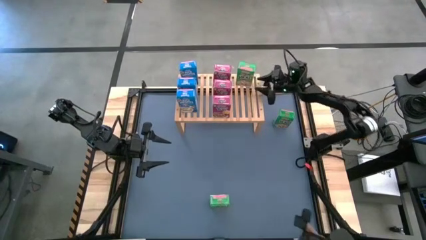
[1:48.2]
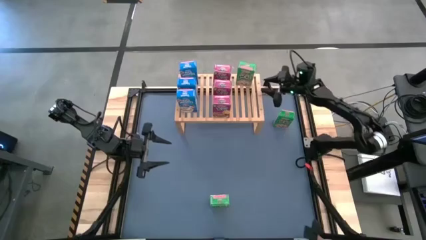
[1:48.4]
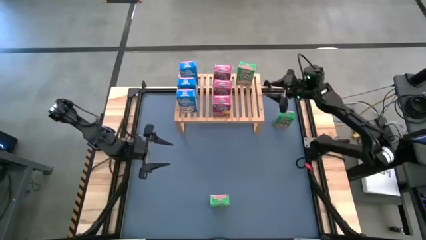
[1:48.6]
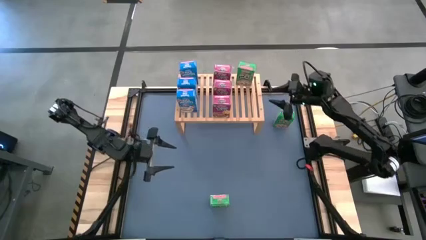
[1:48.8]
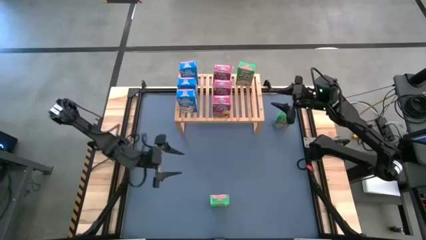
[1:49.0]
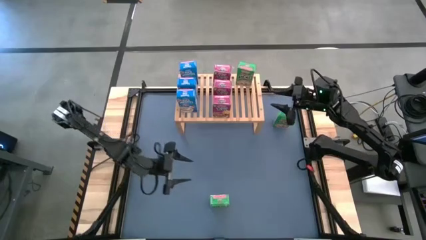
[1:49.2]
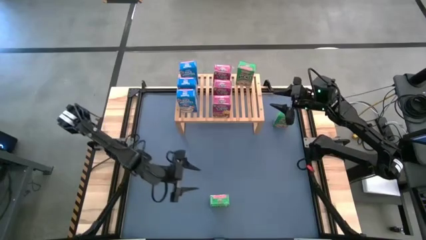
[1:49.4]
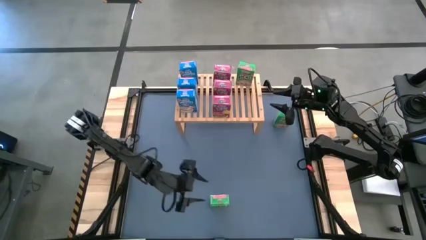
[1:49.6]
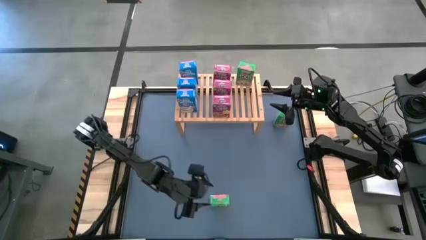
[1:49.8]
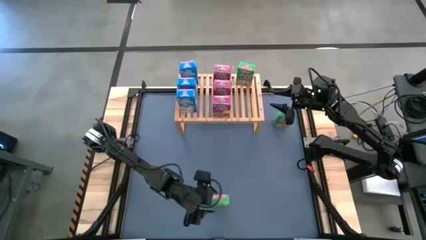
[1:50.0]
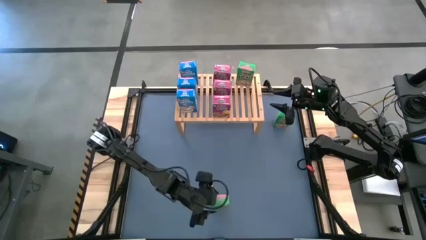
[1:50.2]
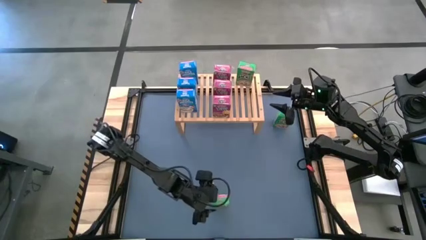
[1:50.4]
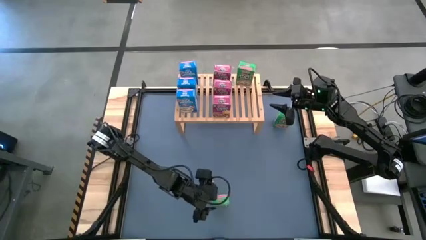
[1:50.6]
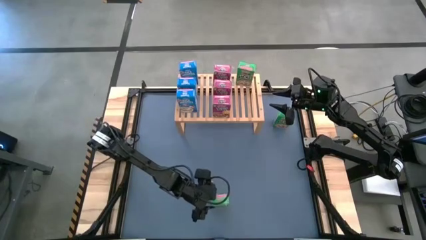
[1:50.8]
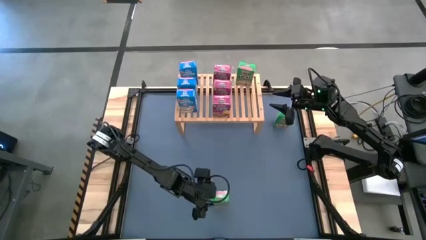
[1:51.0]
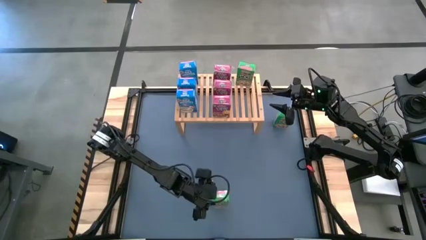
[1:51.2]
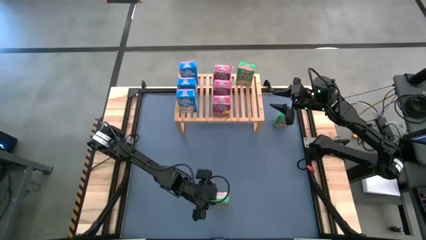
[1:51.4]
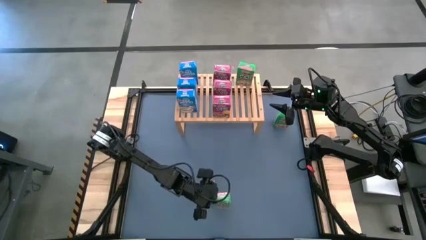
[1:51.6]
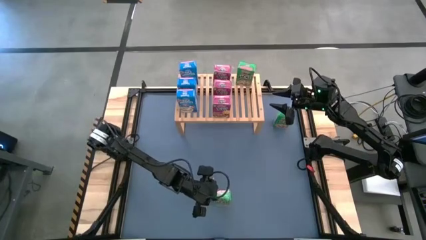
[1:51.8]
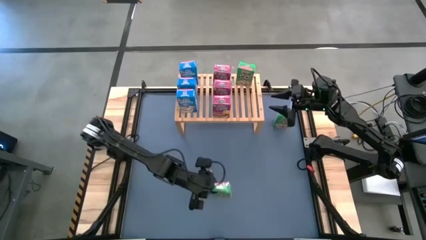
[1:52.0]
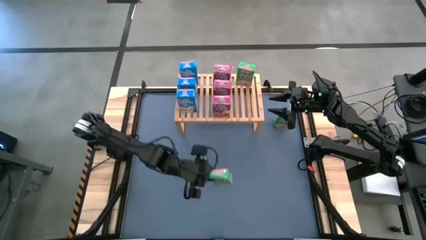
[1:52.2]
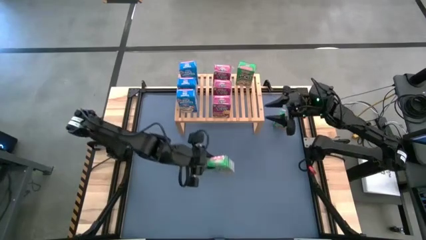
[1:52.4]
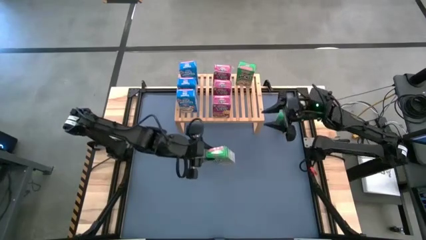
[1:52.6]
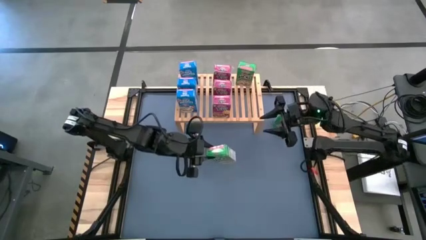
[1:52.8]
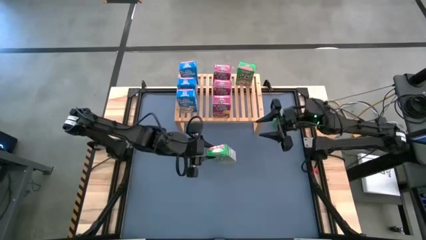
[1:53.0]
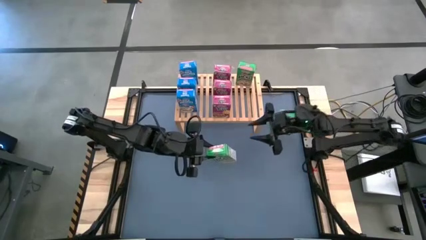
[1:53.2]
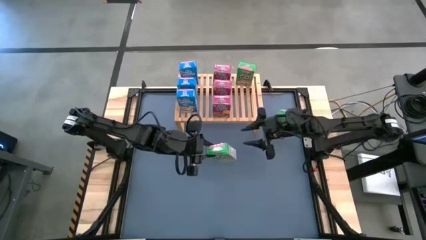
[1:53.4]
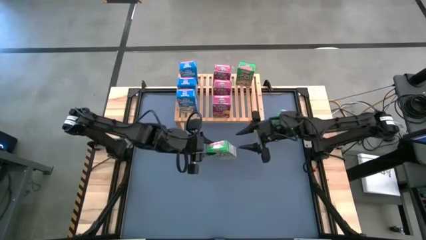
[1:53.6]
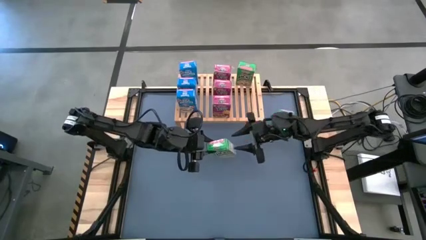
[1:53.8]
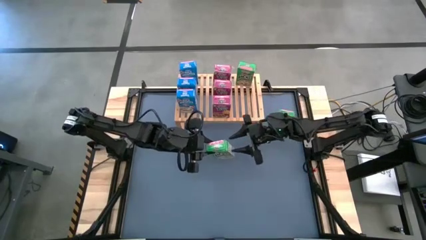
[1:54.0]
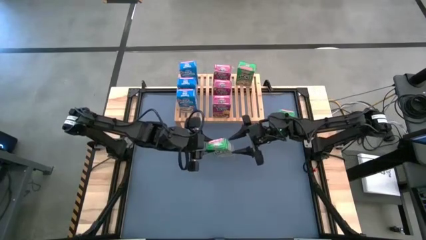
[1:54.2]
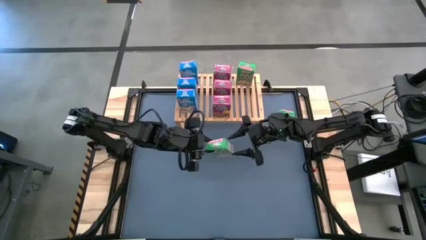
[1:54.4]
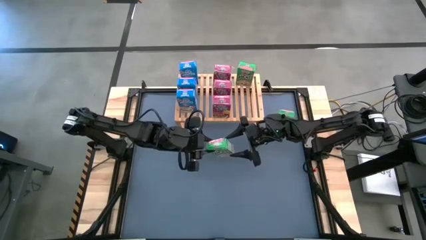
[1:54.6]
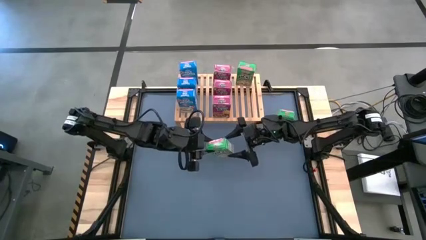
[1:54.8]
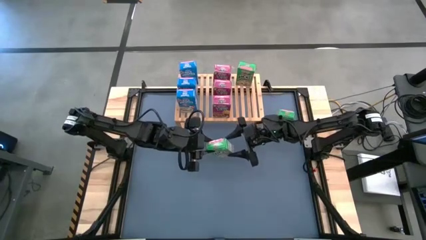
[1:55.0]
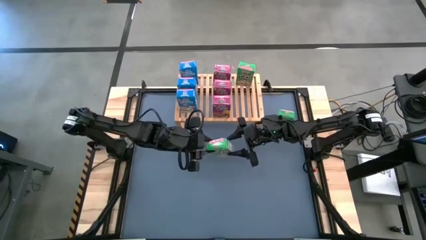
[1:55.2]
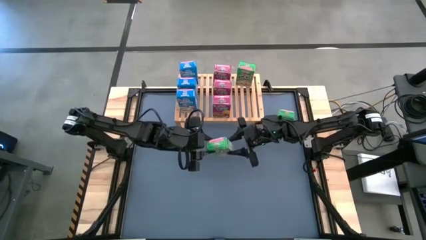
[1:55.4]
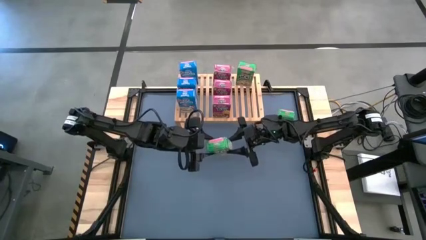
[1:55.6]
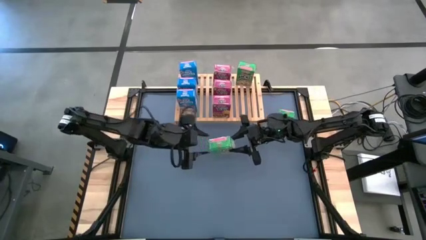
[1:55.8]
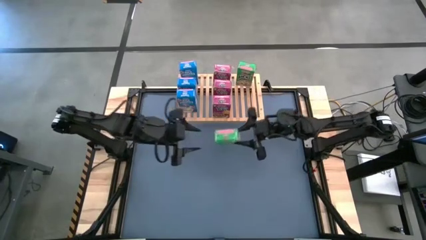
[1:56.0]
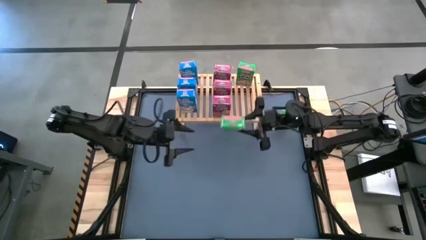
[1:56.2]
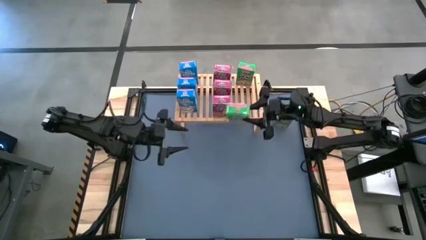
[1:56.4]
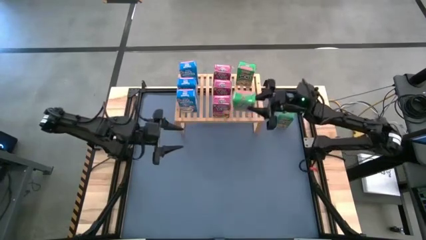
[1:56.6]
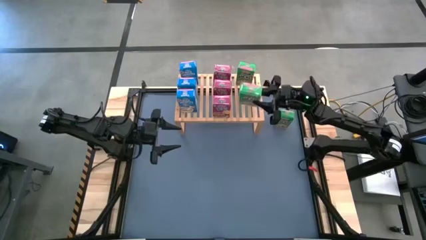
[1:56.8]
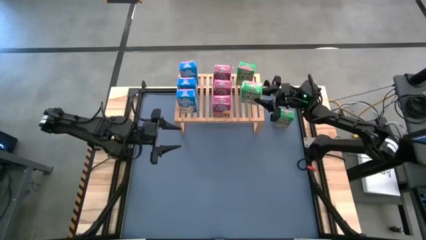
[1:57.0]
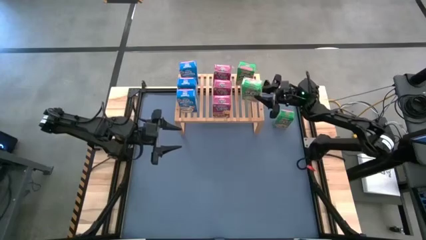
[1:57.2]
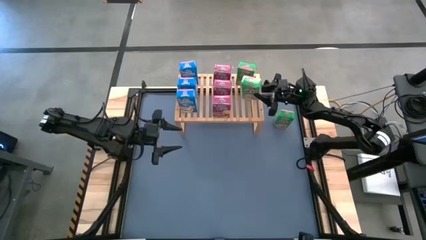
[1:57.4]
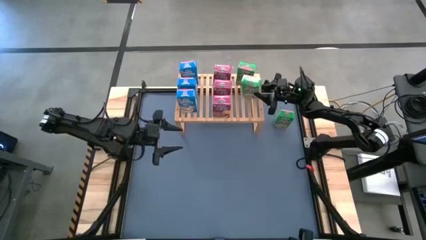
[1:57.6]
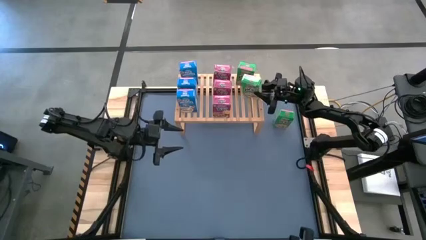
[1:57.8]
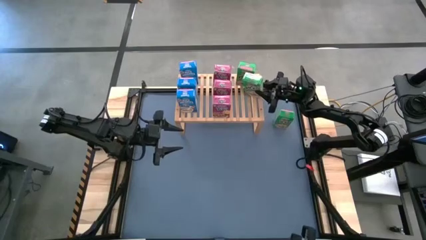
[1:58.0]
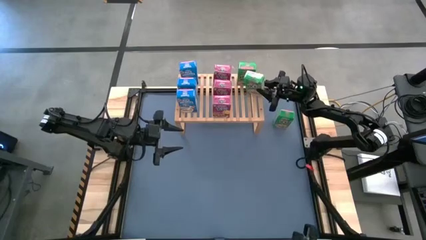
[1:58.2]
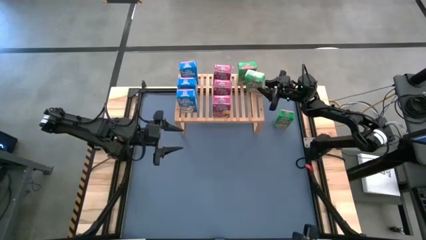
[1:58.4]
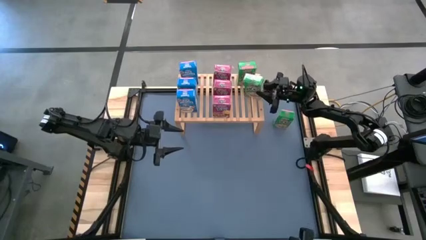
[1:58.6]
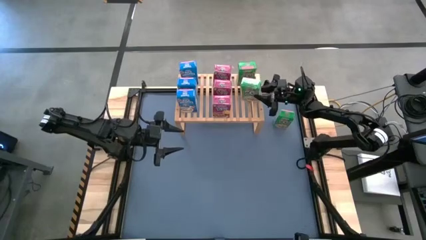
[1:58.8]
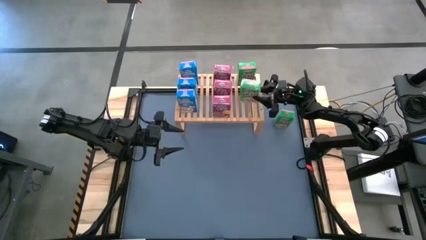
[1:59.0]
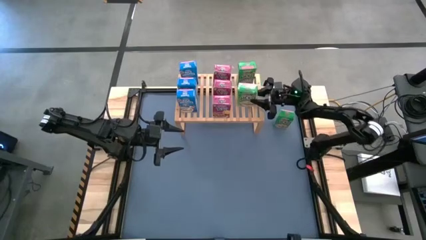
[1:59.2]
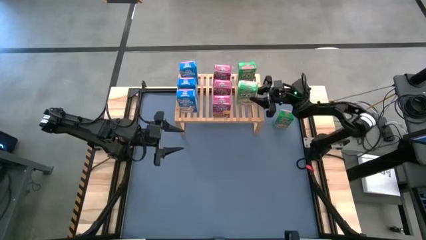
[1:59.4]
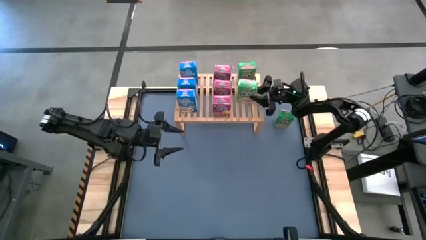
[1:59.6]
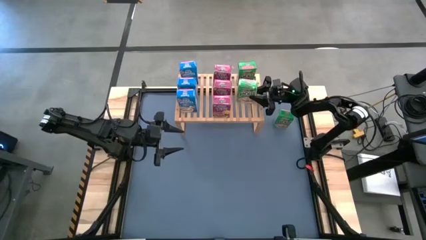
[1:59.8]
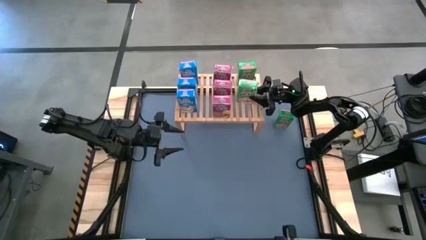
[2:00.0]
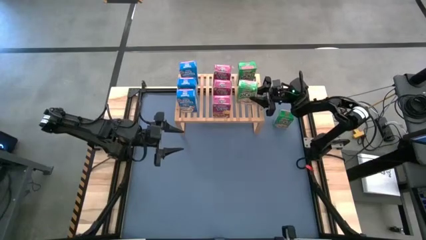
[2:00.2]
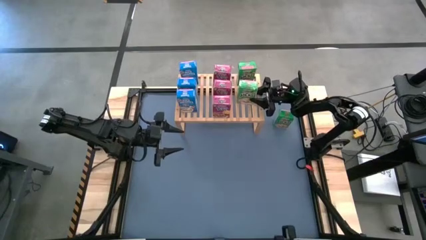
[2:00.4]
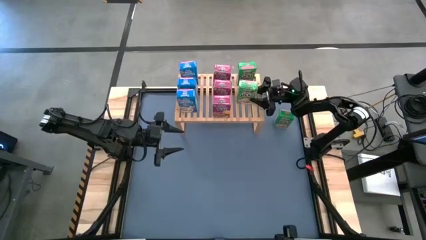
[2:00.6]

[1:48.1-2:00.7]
Task: Stack cereal on shelf
Put the bottom green cereal box on the shelf aligned with the other green cereal box

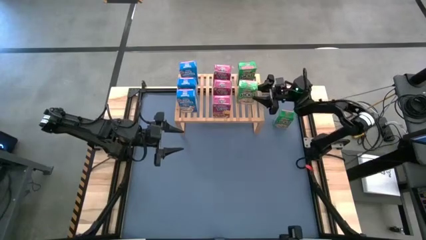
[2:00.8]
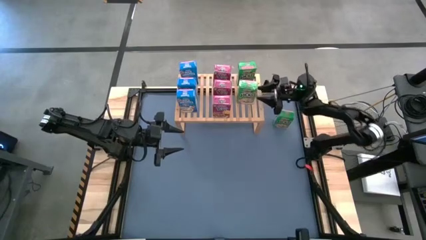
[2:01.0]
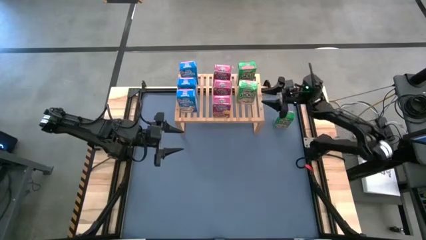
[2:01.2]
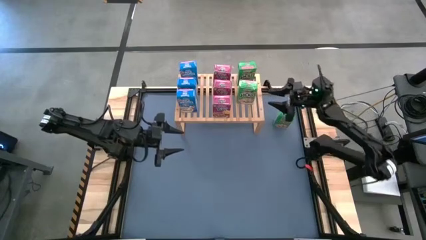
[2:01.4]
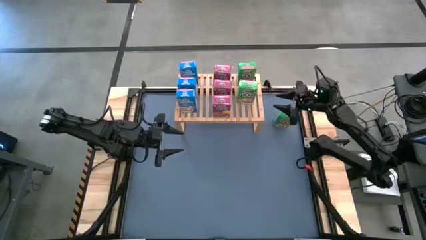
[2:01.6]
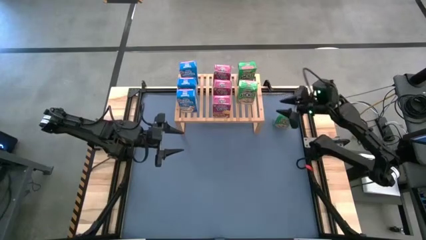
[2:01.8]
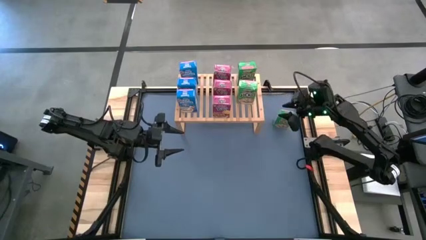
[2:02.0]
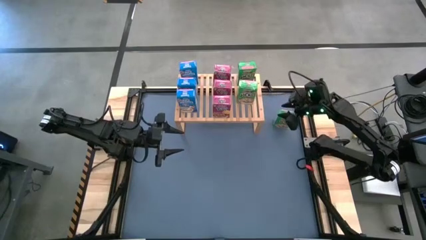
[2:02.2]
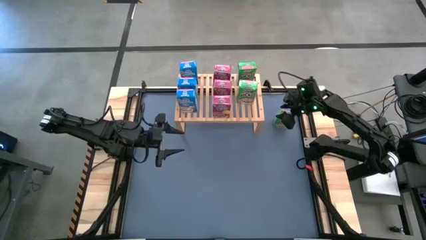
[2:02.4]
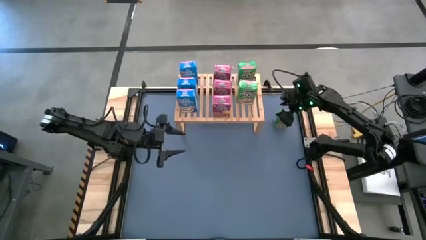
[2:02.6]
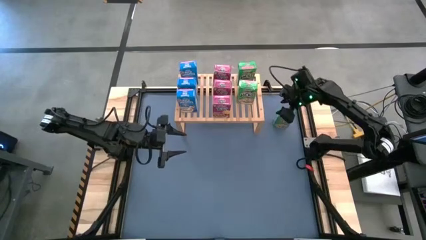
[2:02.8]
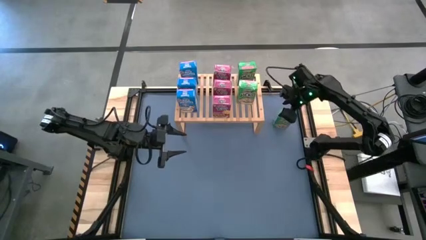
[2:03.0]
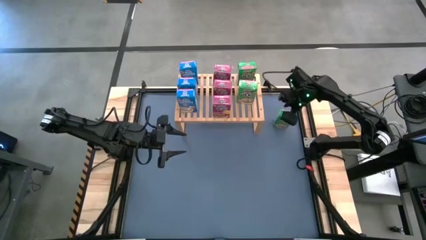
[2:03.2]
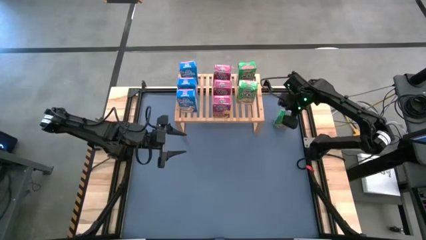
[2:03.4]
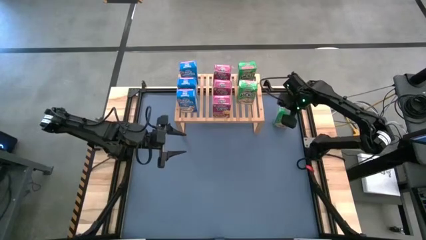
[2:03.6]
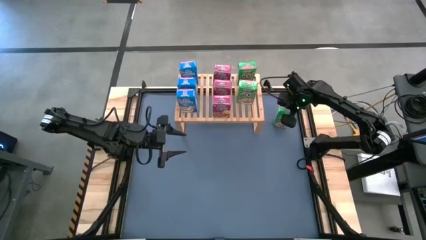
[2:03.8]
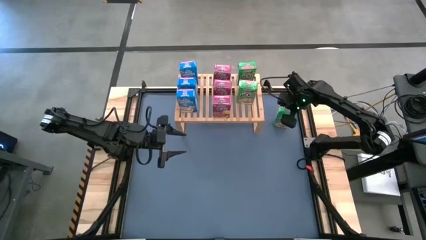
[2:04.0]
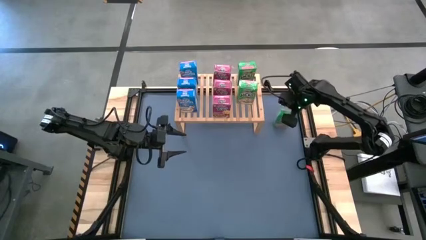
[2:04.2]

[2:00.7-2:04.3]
Put the green cereal box on the shelf aligned with the other green cereal boxes

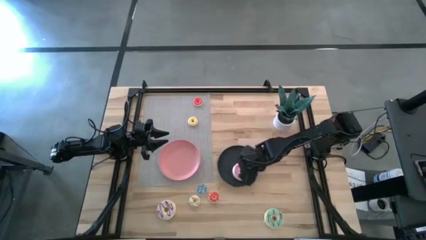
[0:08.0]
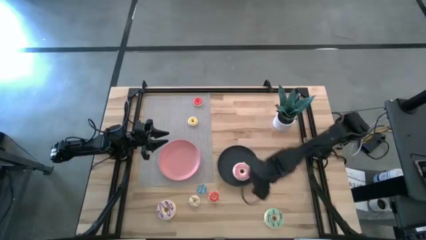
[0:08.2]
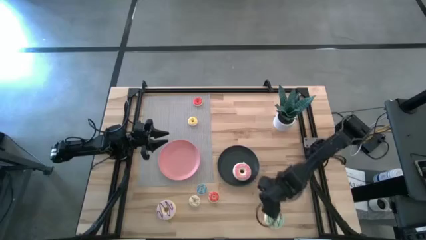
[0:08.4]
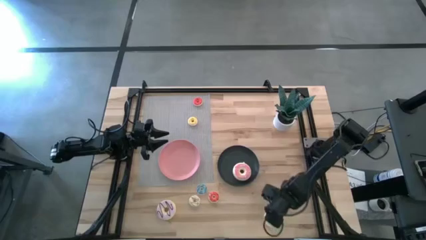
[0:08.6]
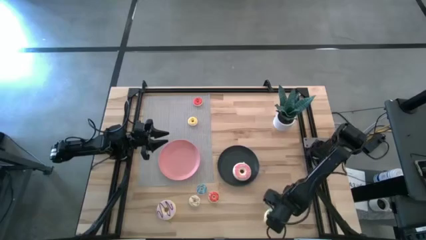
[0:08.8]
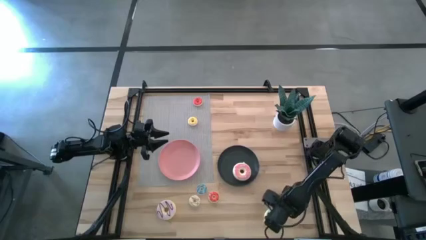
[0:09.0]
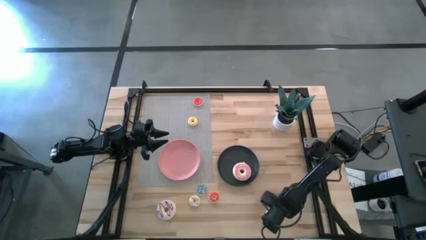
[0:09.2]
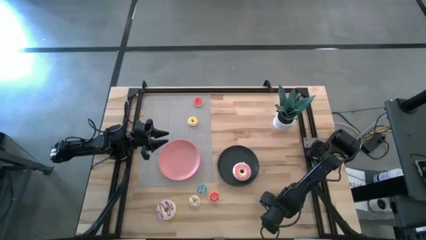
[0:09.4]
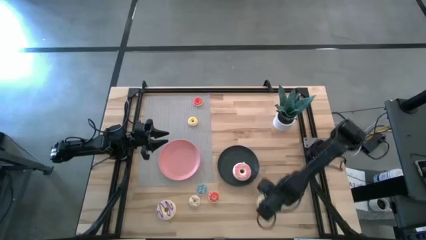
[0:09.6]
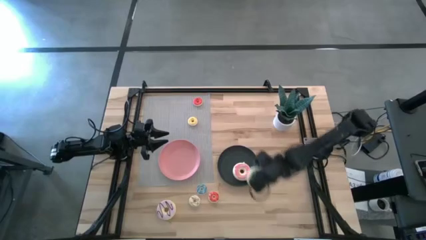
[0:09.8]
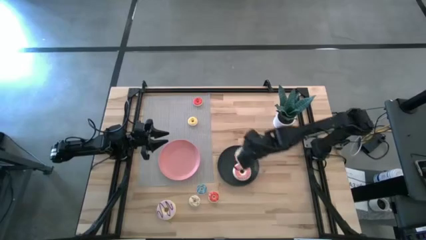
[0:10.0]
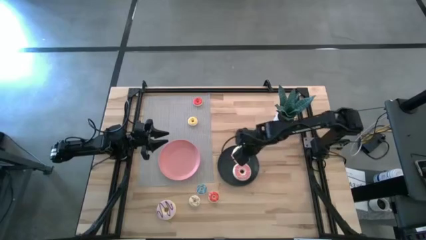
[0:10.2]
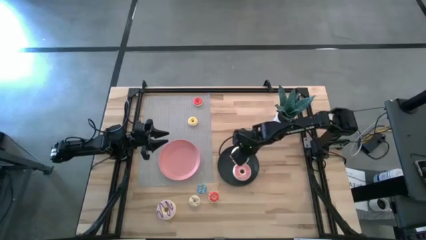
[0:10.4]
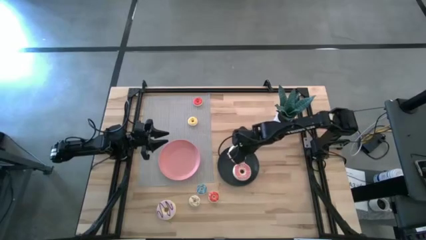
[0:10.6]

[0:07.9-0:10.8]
Task: Pick & Place donuts
Put the small light blue donut on the black plate
